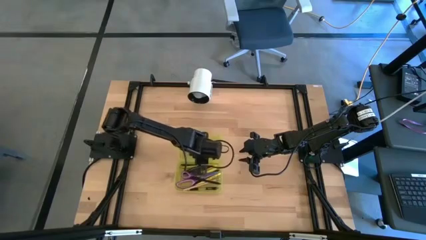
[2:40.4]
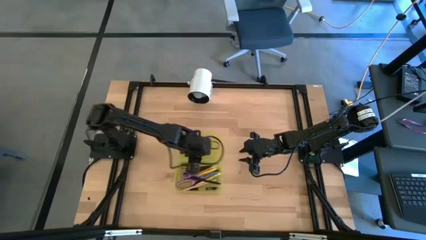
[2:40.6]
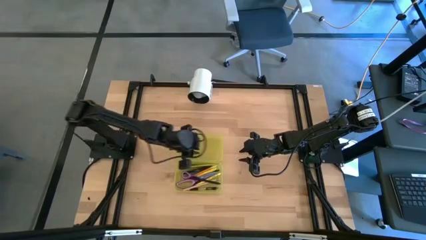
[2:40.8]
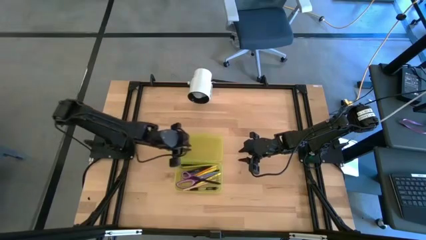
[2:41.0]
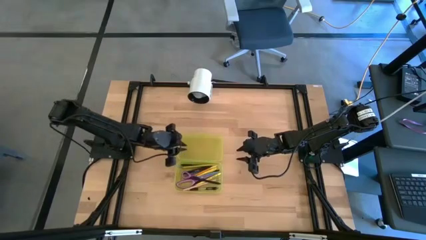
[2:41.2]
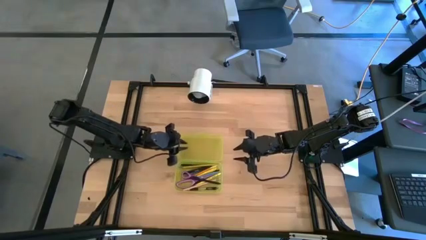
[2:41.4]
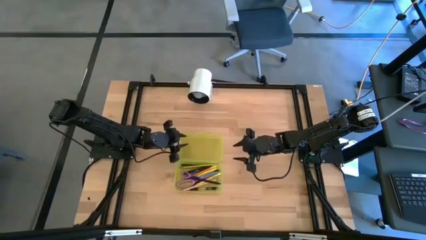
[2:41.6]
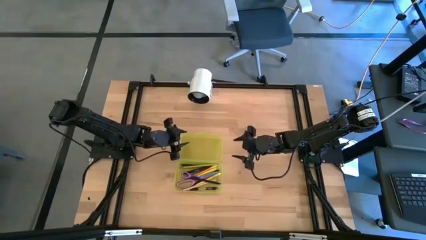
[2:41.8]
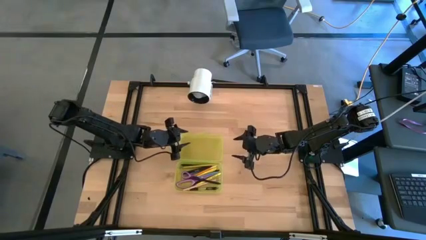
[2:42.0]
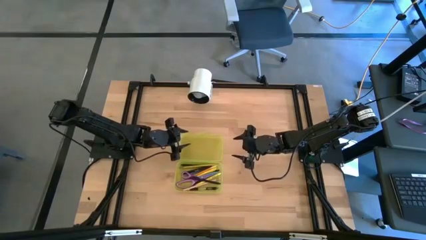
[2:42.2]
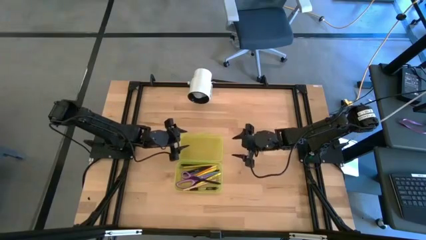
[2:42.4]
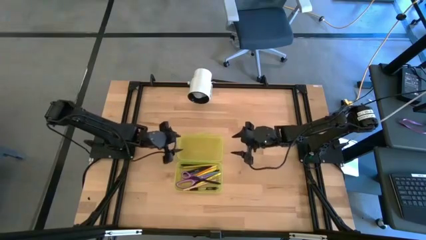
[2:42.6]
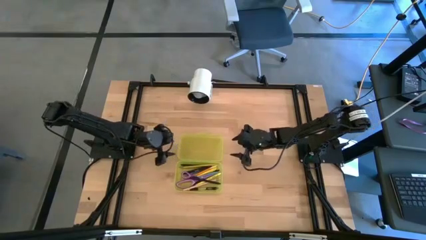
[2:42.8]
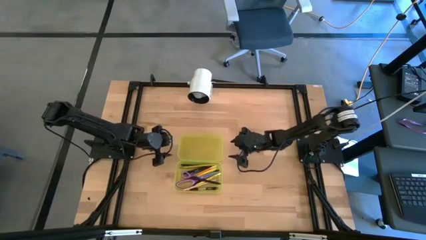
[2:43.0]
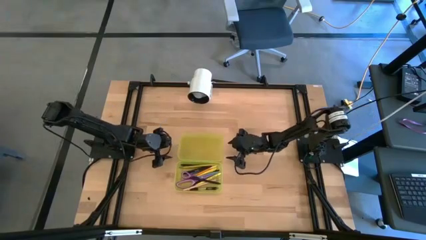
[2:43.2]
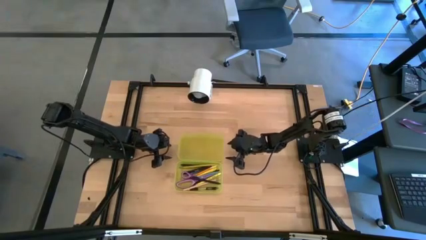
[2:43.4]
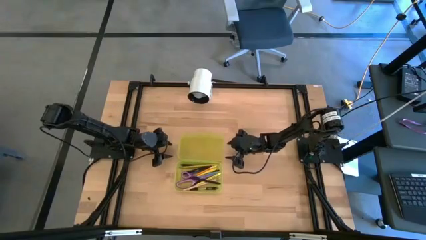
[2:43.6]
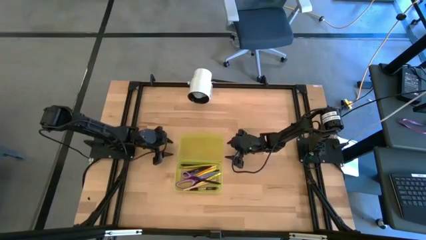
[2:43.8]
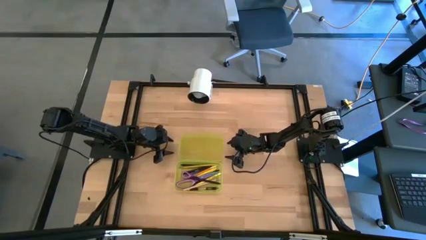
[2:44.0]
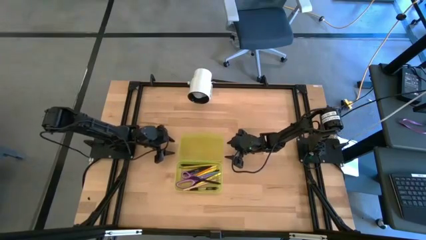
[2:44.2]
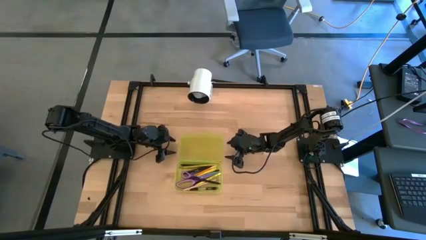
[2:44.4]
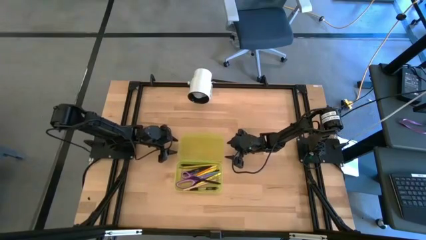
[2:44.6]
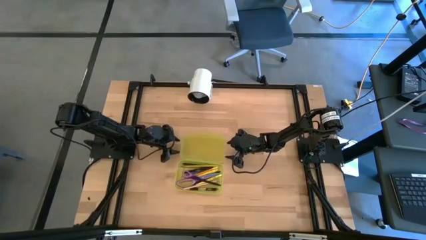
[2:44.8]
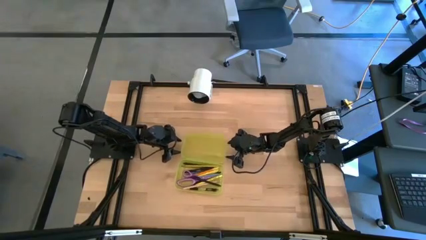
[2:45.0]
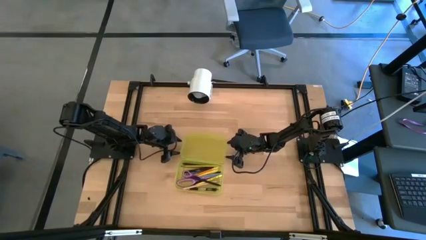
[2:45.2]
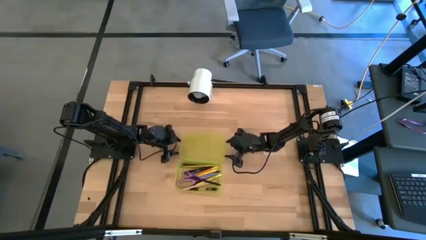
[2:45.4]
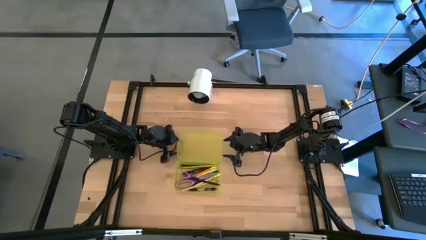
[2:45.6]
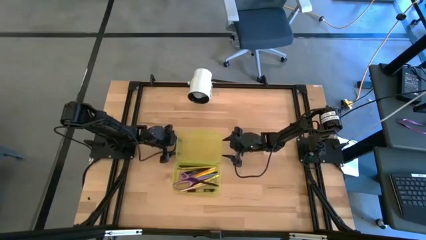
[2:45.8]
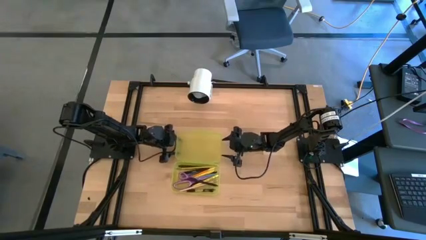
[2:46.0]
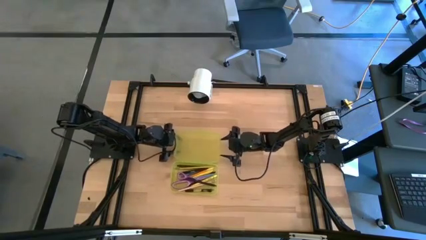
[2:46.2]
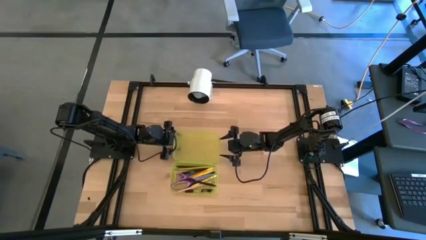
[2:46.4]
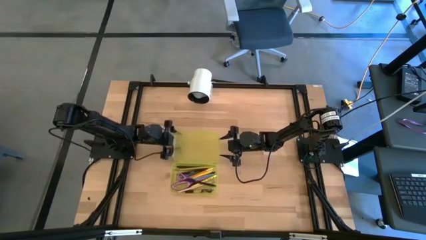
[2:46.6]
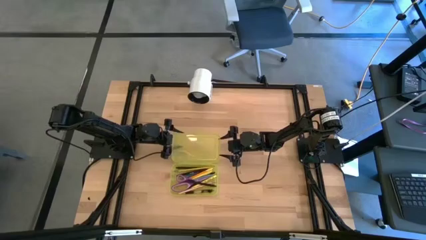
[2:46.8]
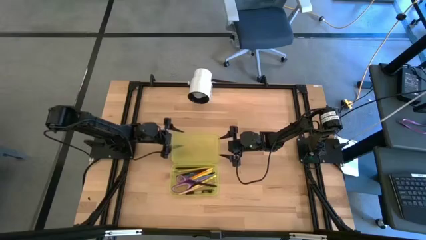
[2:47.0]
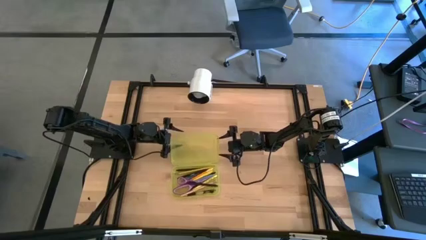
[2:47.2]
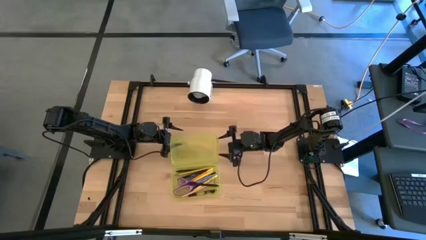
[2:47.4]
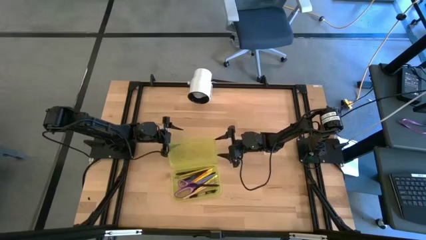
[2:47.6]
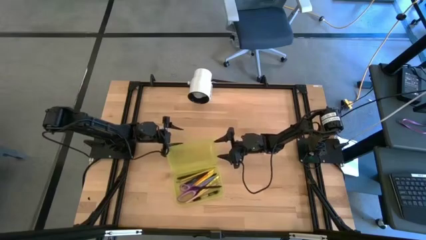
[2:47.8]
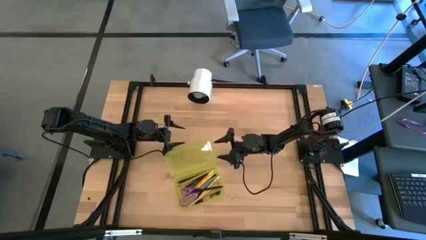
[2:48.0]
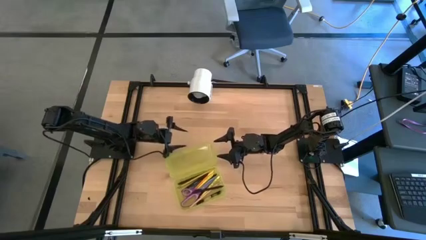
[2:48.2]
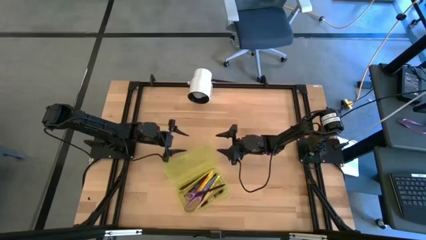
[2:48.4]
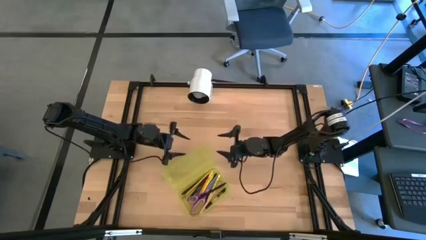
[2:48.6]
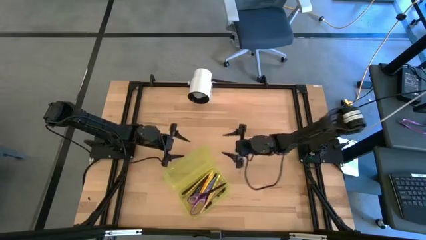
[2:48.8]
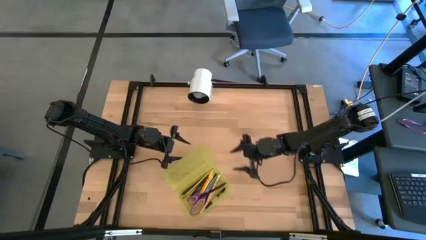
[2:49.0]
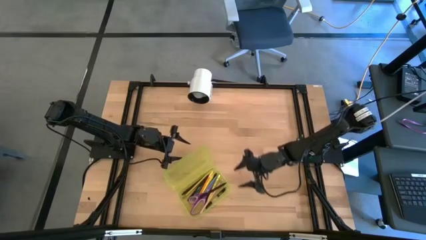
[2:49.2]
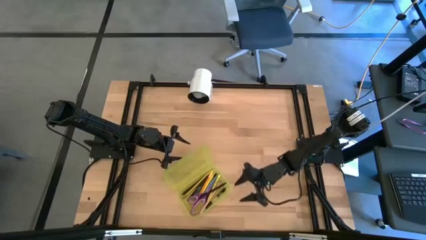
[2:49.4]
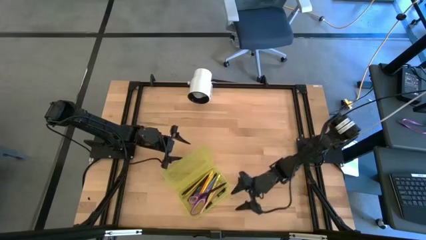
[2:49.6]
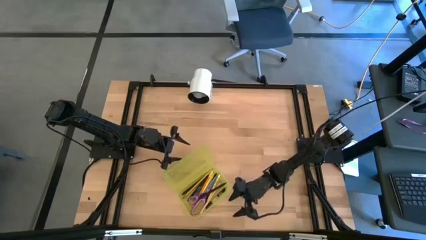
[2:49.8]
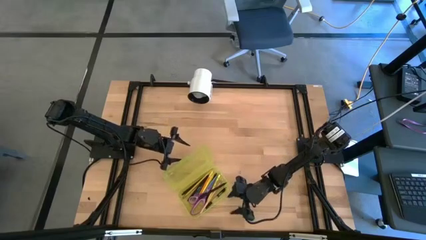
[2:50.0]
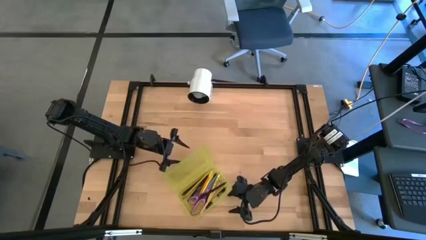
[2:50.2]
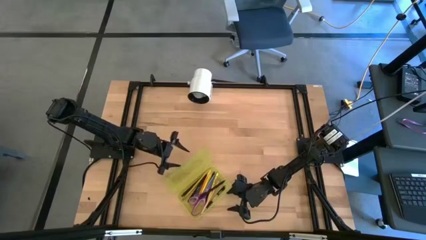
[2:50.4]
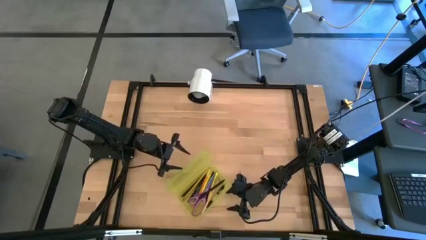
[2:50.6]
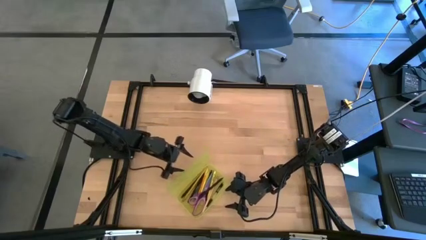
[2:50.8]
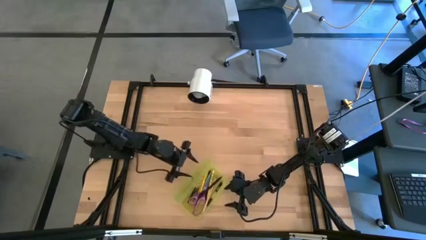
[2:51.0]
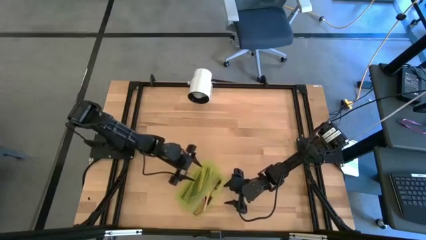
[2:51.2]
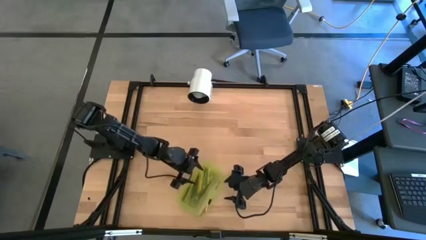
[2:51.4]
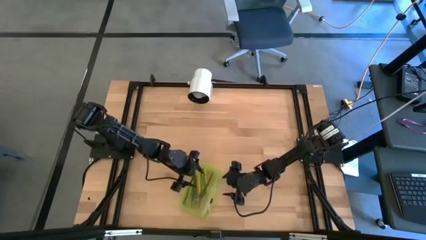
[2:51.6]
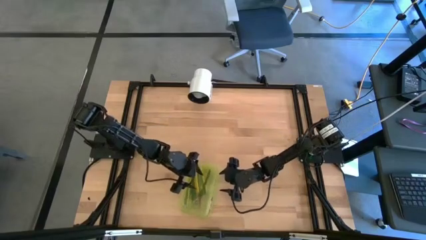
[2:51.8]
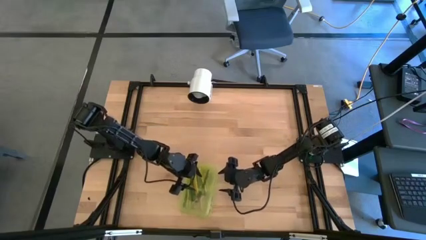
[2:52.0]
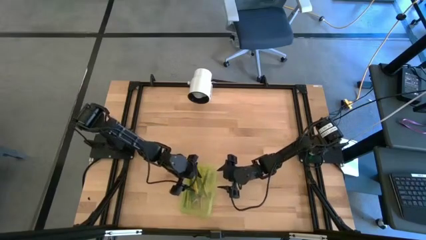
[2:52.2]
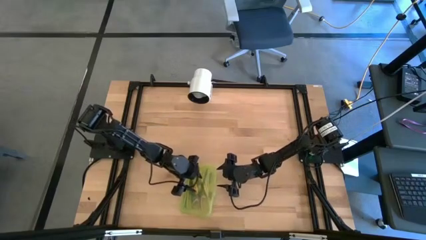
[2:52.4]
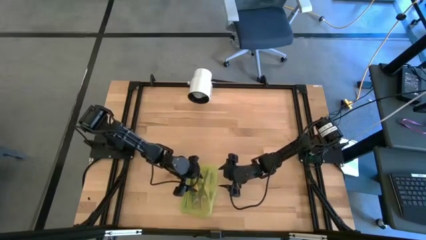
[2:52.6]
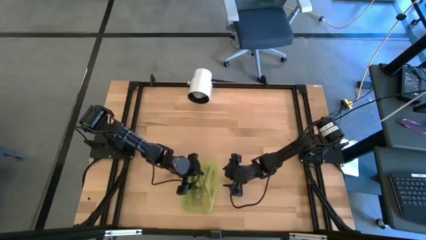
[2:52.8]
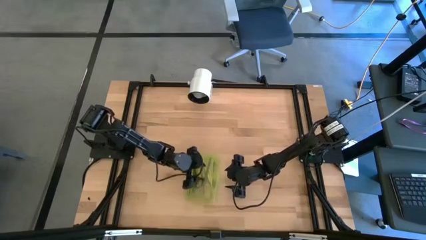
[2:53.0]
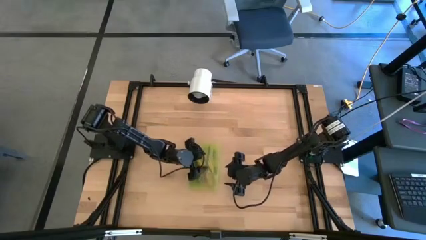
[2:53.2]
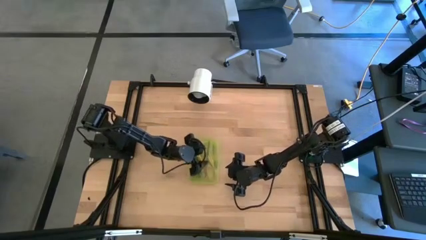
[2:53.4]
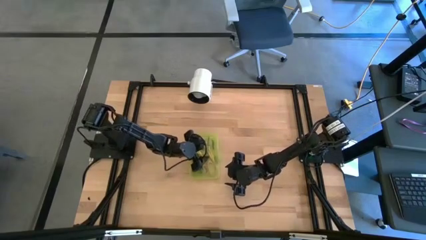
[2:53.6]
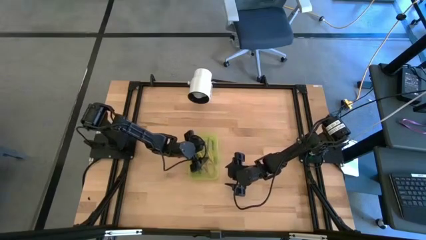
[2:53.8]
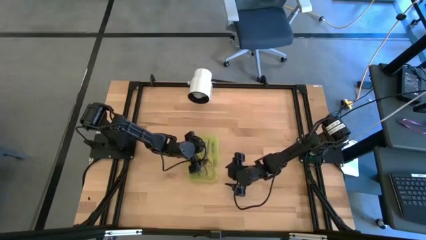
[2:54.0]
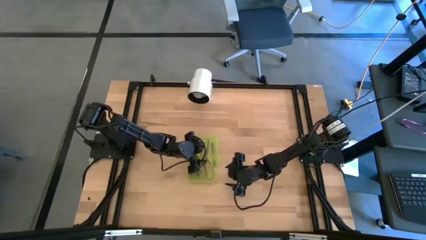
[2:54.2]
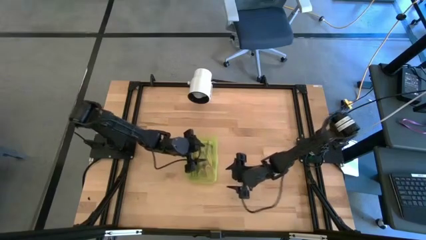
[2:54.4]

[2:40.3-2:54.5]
Task: Pick & place school supplies into a supply box
Close the yellow supply box

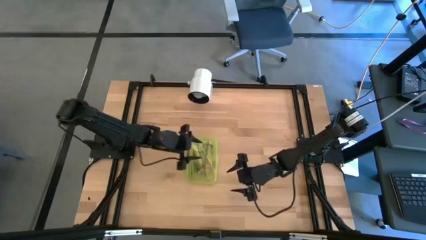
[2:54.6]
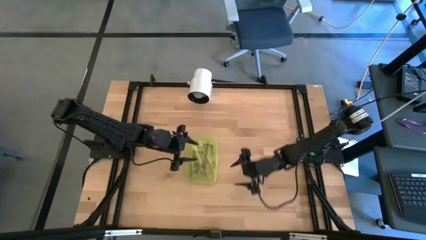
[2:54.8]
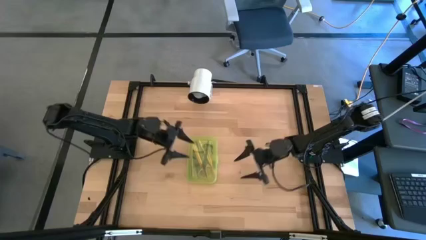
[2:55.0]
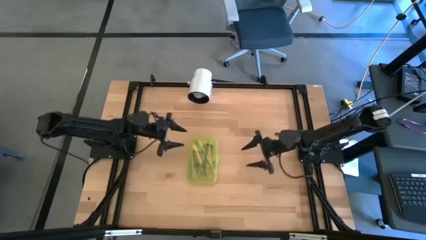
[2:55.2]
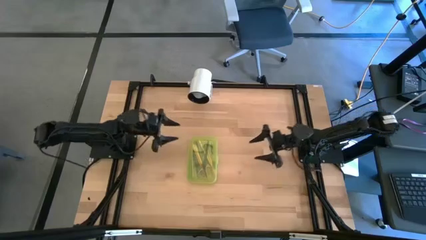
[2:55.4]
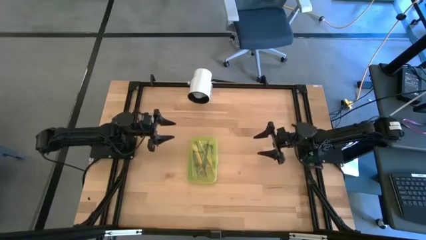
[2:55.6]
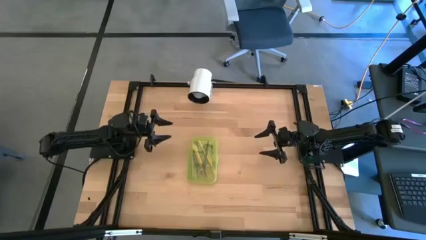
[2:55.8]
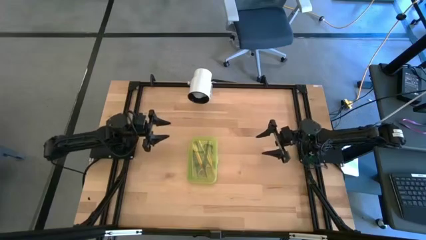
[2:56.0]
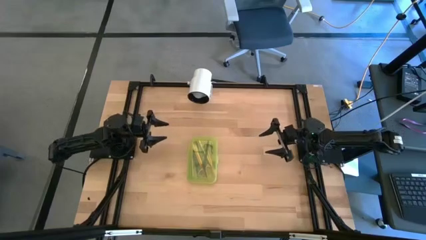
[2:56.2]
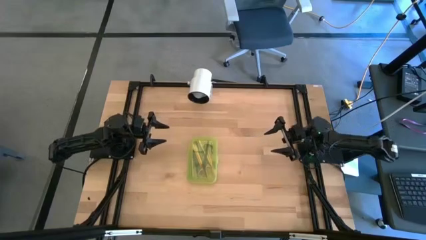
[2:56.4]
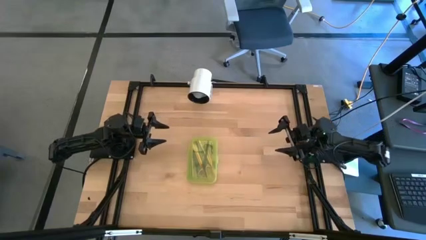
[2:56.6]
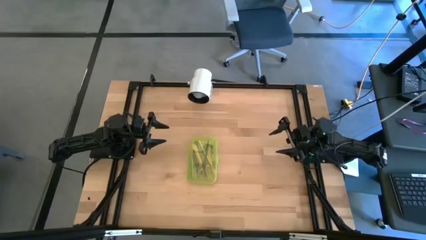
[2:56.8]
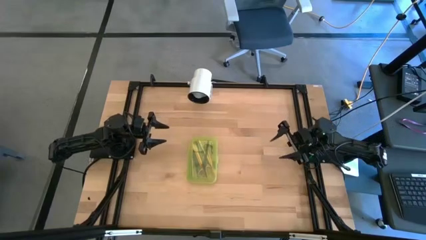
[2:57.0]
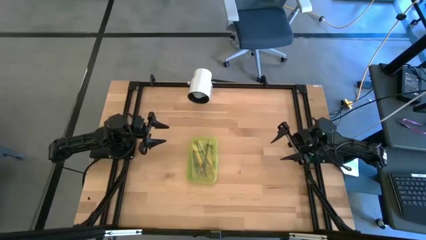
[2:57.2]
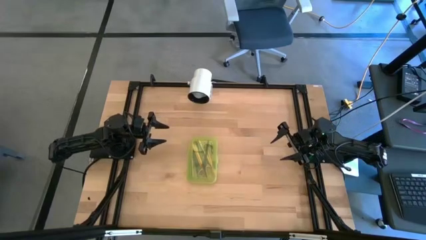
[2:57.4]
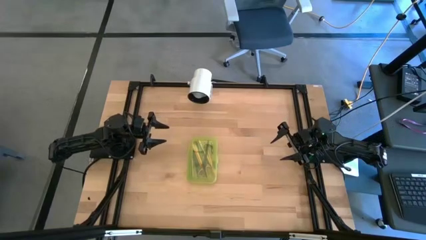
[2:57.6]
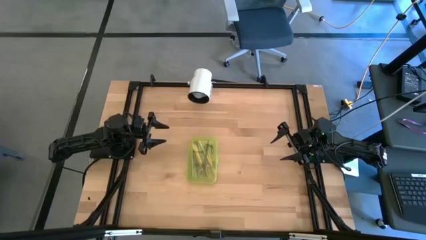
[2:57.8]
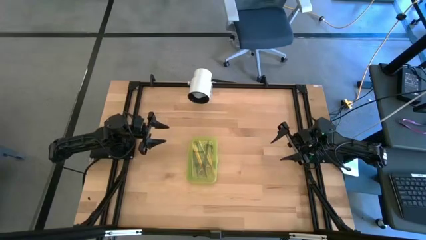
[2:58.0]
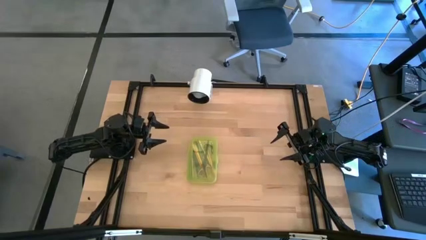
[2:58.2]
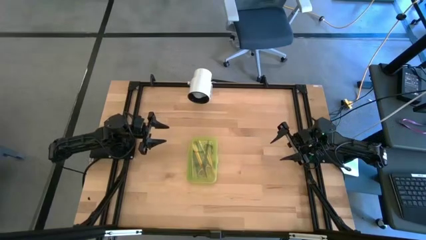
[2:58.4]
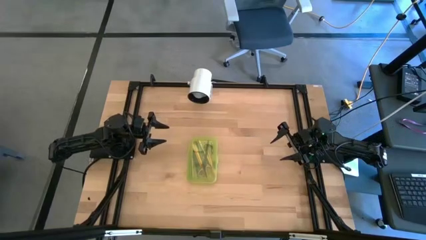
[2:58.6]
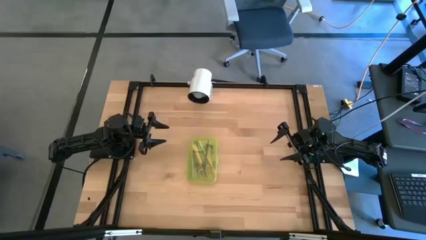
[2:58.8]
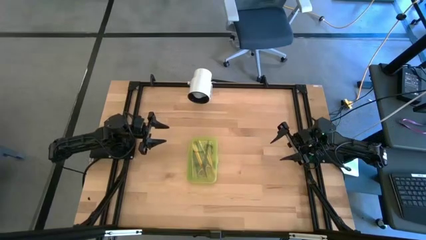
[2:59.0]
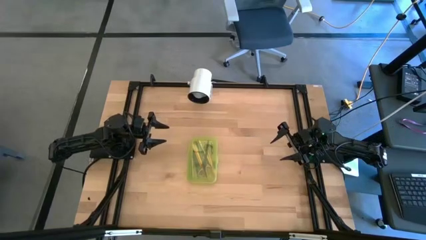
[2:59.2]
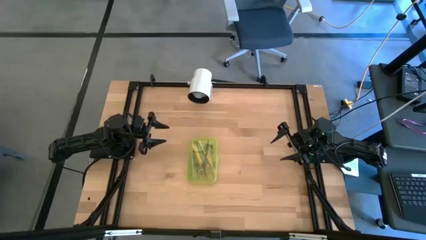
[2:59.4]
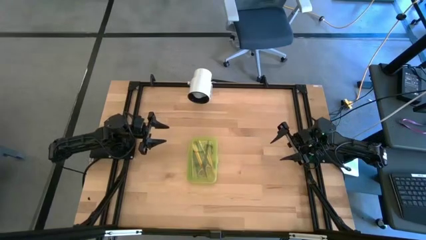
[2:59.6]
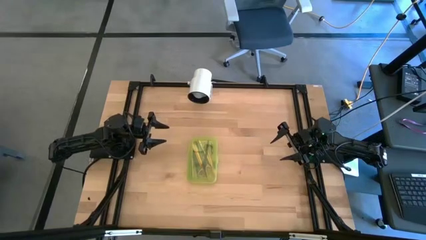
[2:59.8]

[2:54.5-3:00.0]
Return to Home Position
